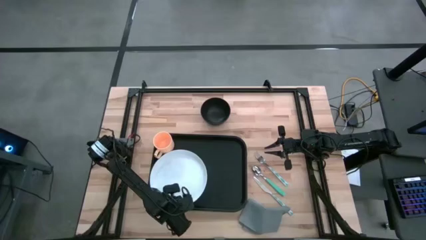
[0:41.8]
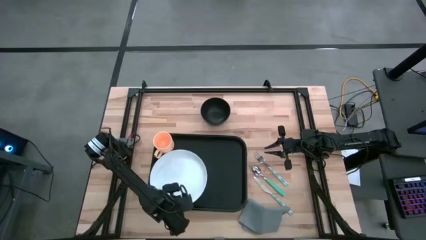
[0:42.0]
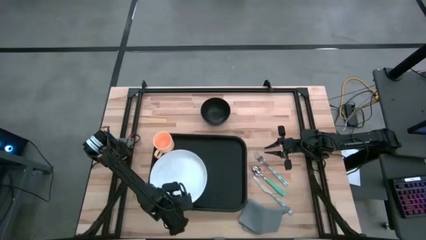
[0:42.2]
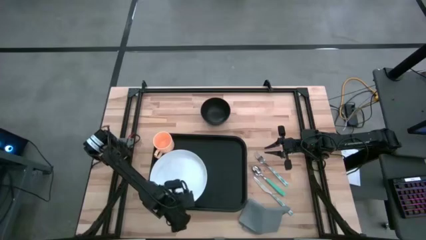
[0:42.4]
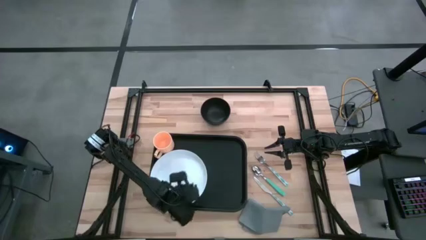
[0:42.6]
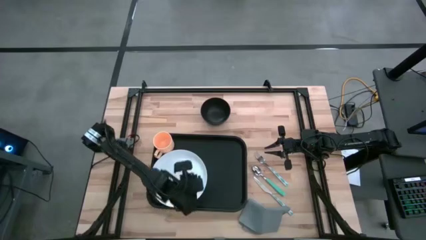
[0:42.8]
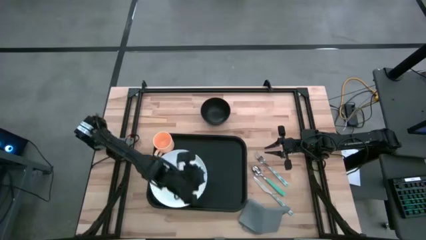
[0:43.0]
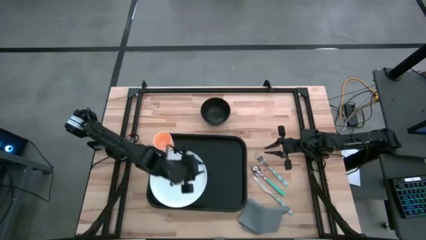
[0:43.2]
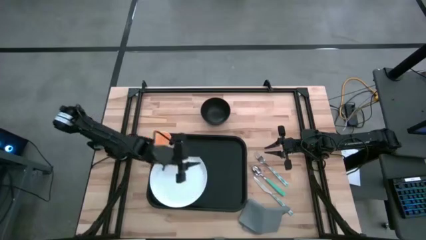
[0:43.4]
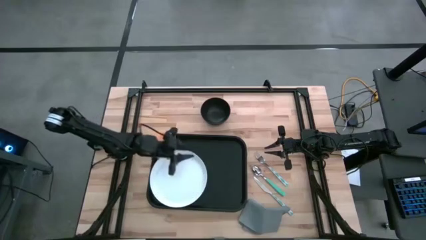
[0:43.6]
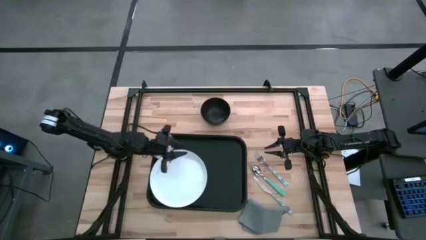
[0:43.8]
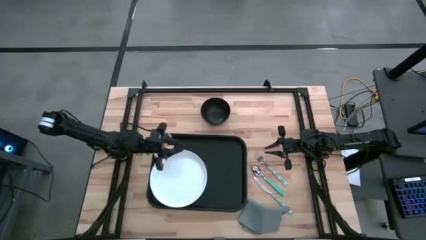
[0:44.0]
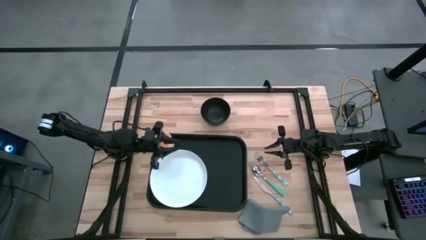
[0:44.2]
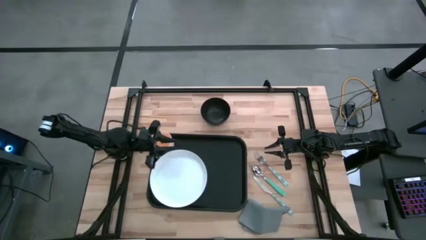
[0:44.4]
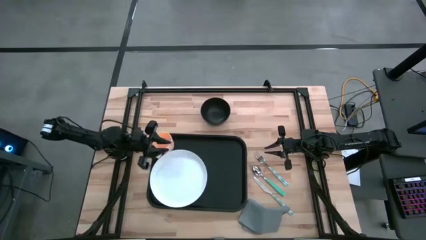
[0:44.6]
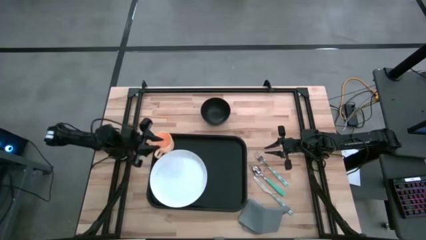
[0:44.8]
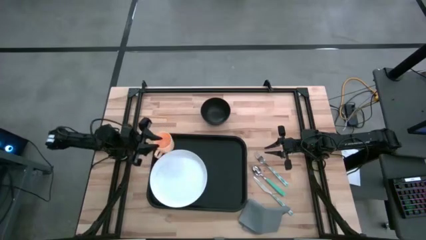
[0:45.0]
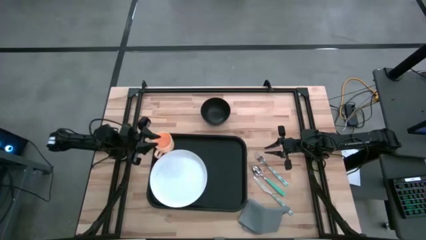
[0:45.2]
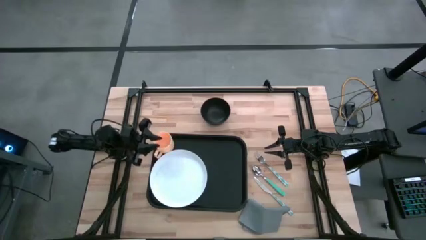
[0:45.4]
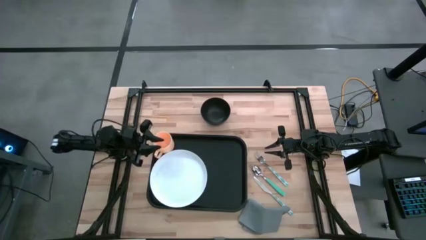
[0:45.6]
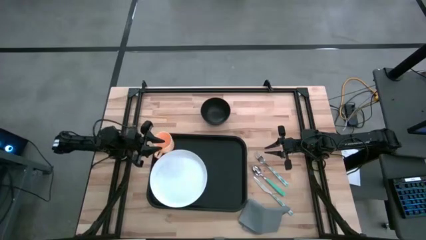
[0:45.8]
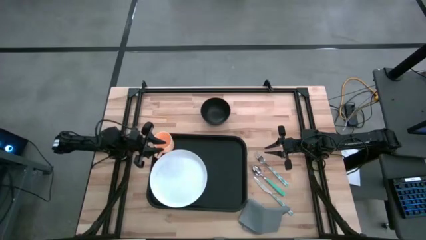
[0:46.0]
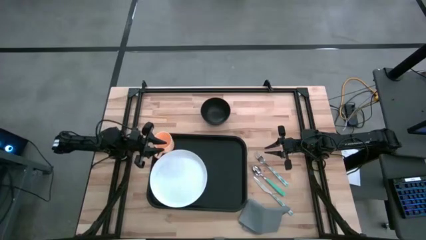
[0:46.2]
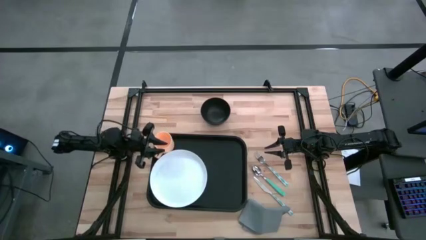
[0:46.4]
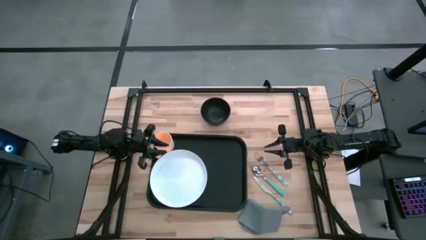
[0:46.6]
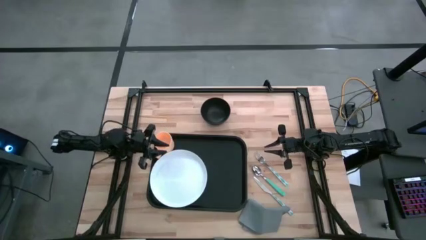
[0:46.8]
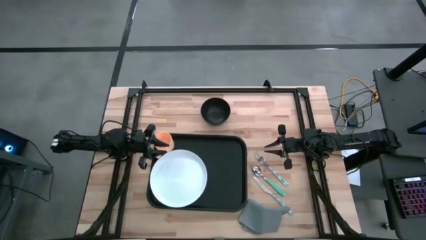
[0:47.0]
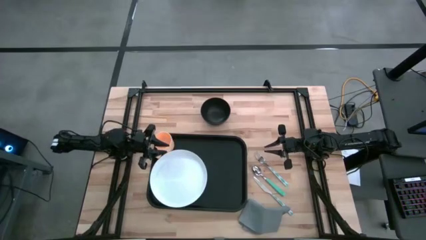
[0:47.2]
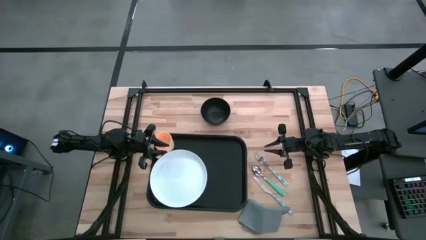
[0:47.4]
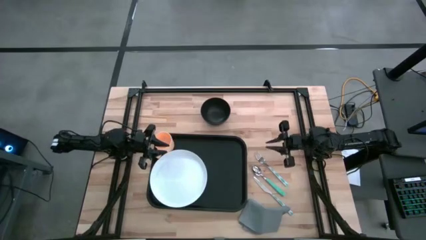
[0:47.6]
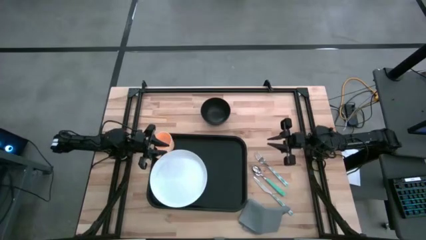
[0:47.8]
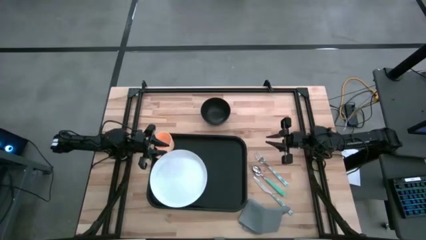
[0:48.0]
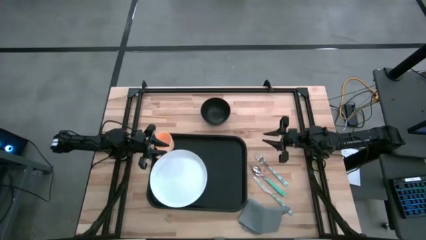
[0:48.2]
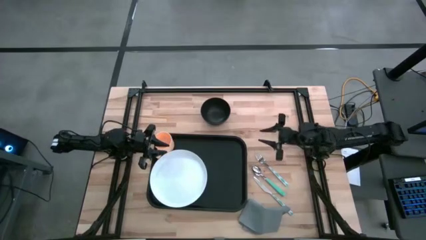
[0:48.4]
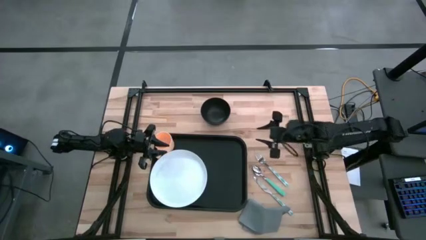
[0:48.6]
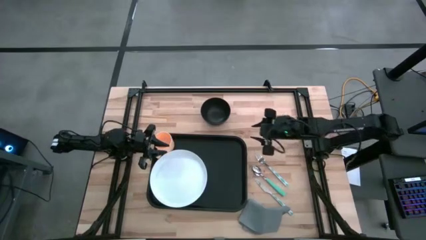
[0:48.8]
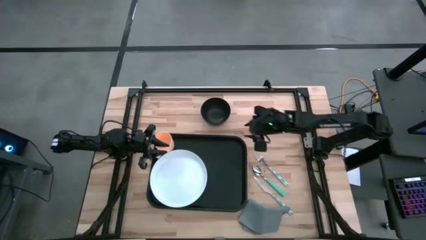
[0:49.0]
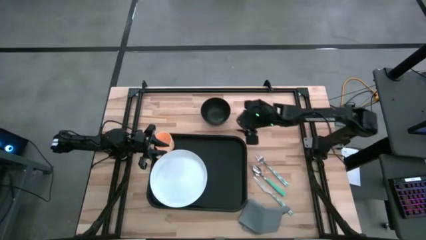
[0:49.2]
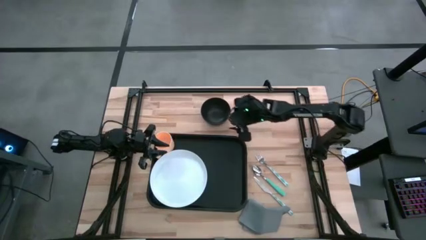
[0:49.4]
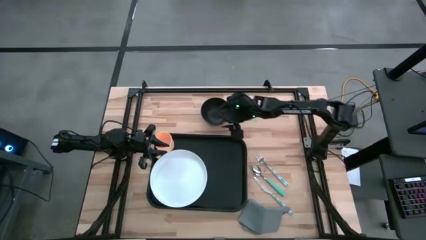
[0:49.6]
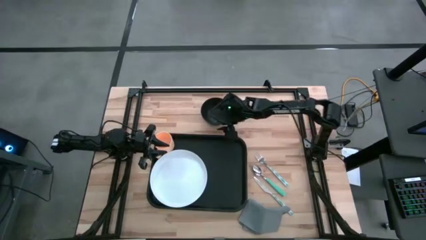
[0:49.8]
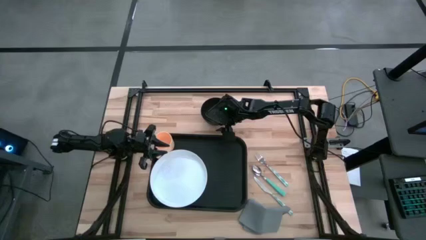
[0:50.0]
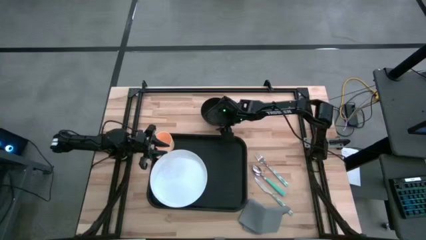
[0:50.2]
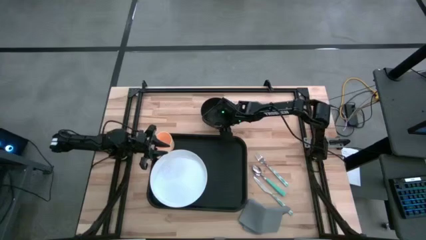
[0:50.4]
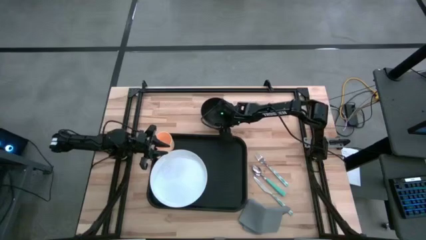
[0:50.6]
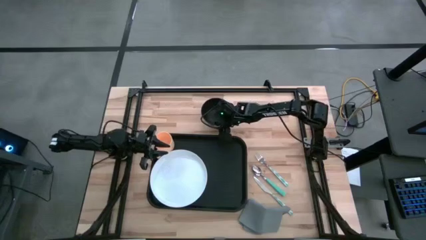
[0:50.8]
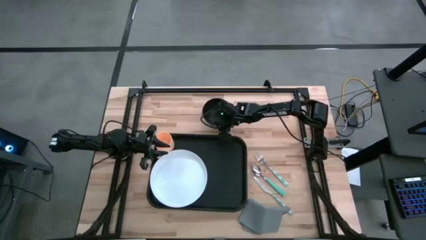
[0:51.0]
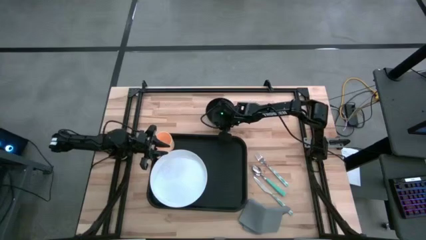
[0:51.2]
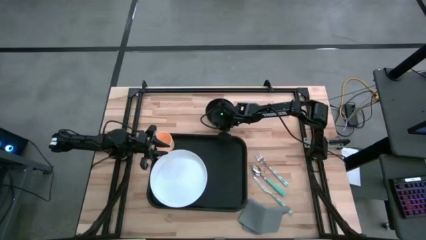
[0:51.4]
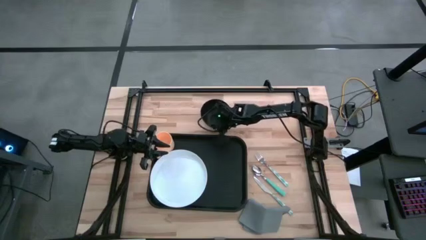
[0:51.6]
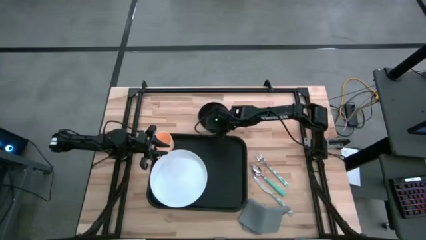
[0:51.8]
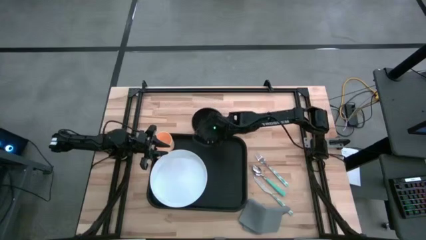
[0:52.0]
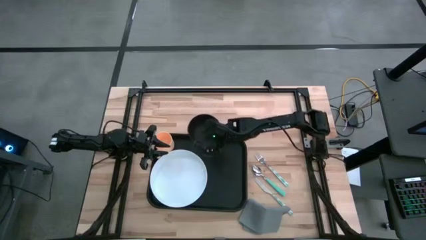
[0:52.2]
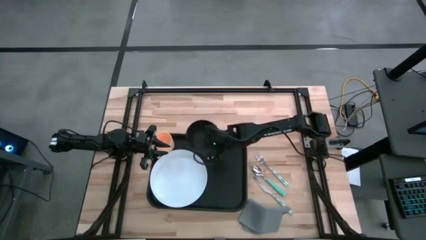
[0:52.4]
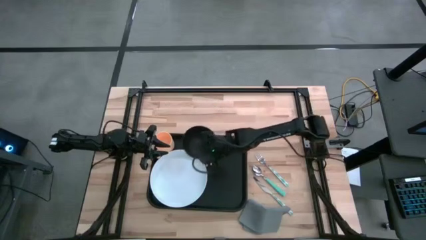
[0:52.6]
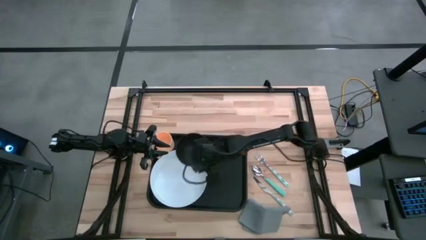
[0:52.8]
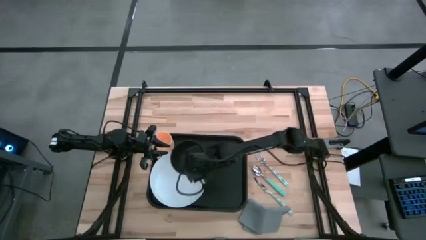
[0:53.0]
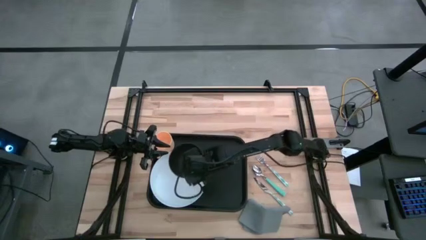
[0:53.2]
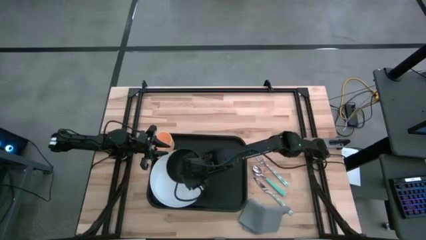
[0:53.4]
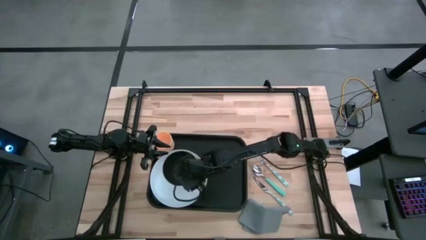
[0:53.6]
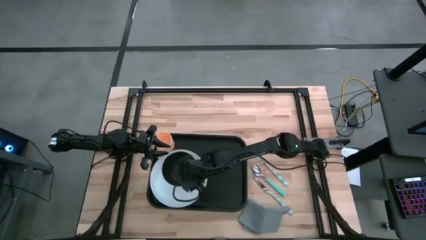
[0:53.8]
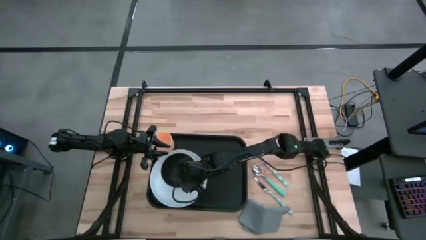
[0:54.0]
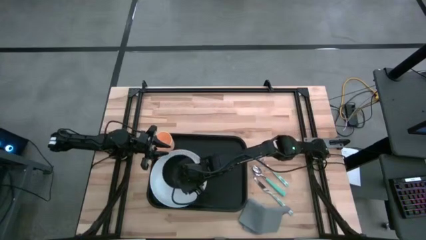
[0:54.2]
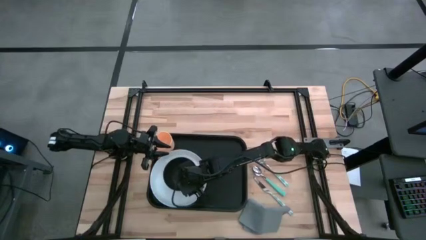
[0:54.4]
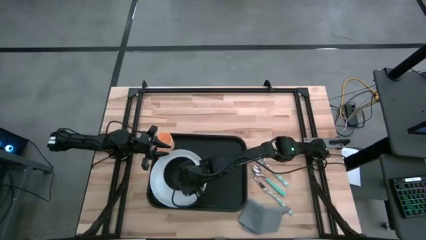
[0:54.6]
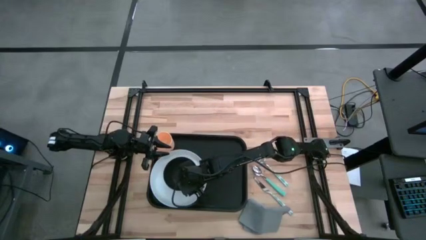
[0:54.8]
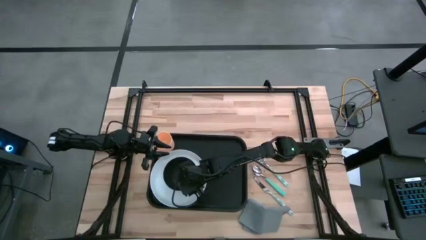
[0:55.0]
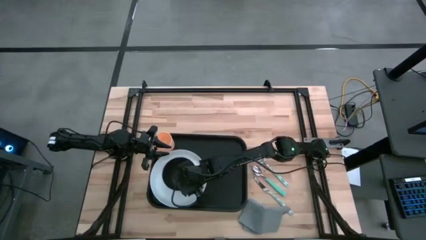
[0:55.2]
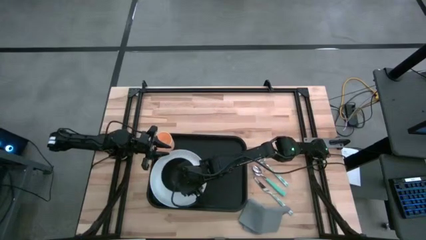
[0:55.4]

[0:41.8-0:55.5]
Task: Set up tray
Stack the black bowl on the white plate on the black serving tray

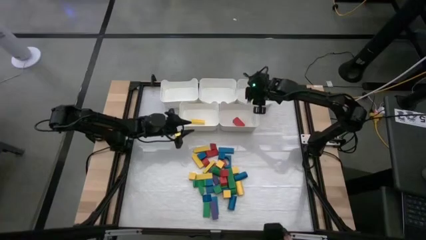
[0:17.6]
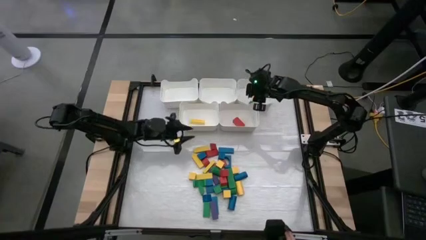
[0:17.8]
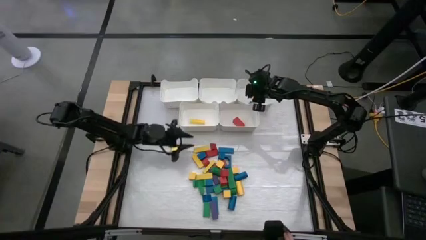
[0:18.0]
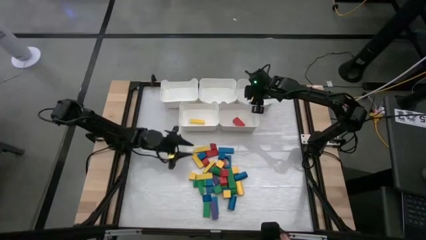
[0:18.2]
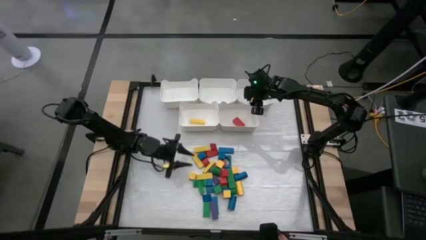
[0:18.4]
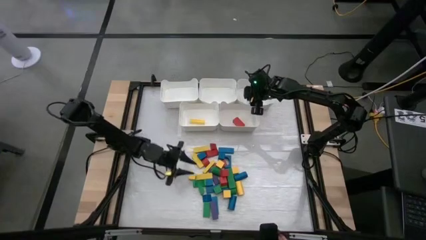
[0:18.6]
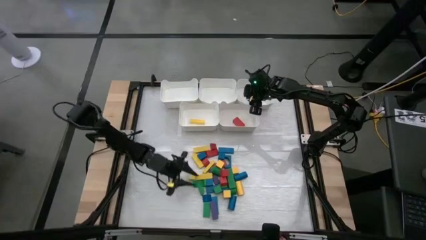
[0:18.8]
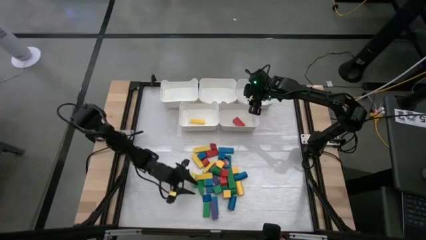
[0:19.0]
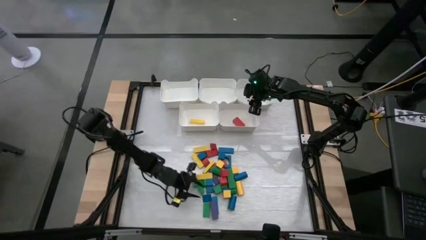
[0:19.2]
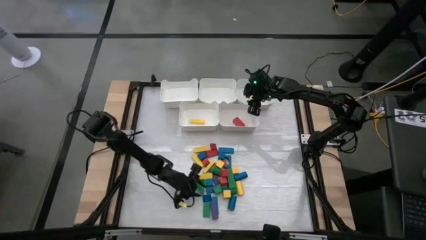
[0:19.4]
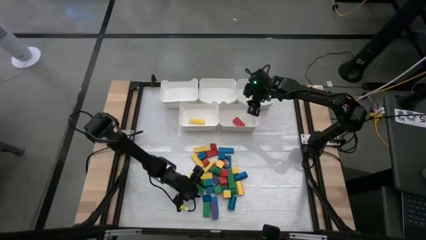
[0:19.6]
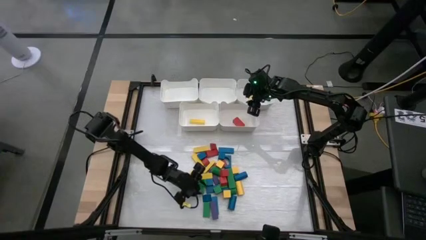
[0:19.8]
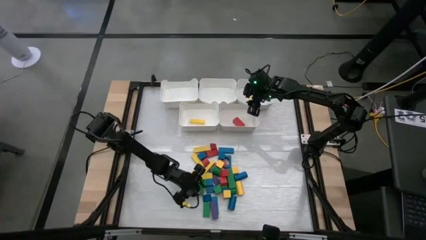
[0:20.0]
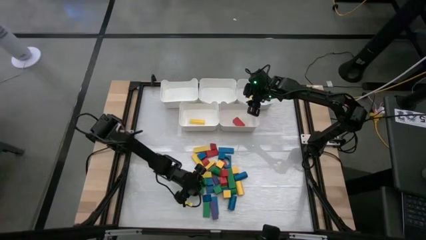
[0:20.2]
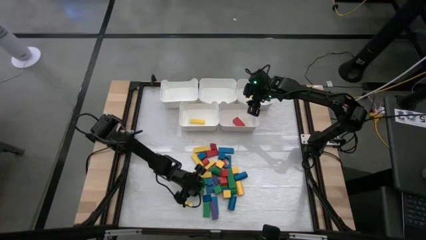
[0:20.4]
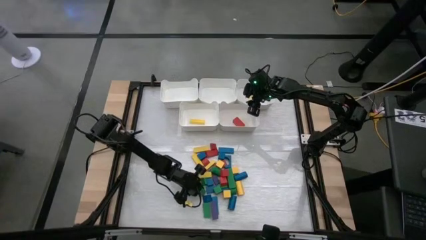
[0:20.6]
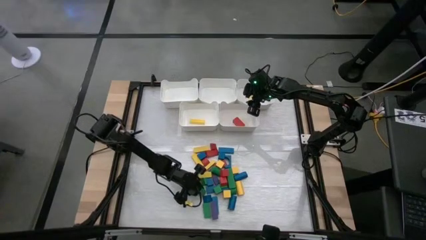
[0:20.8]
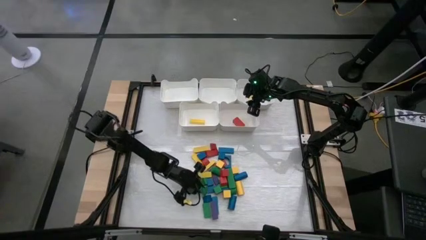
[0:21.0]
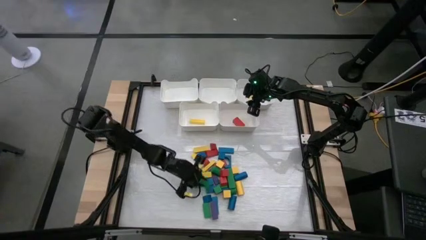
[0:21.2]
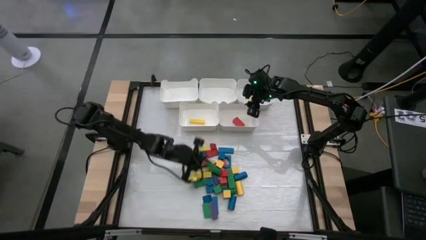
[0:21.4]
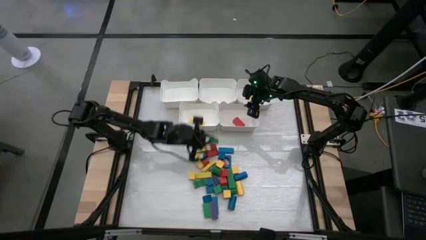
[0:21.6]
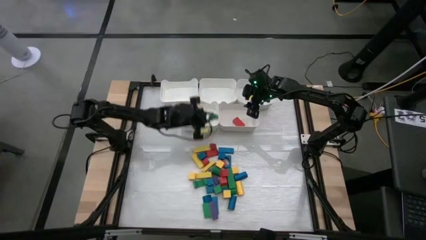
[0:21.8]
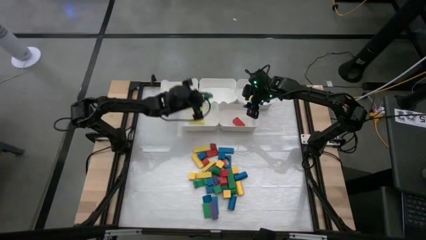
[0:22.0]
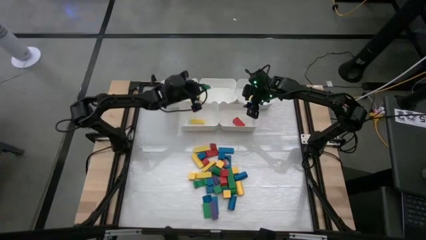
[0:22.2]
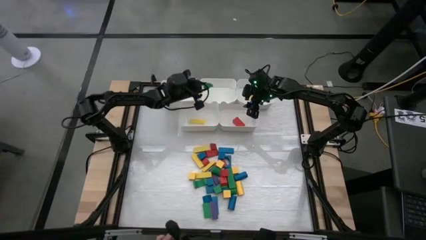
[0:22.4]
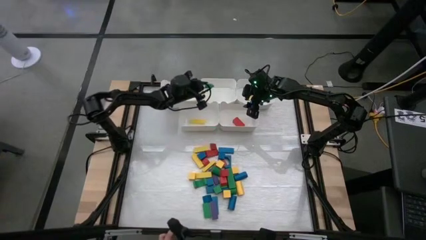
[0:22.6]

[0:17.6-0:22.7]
Task: Sort blocks
Put the green block into the top center bin
